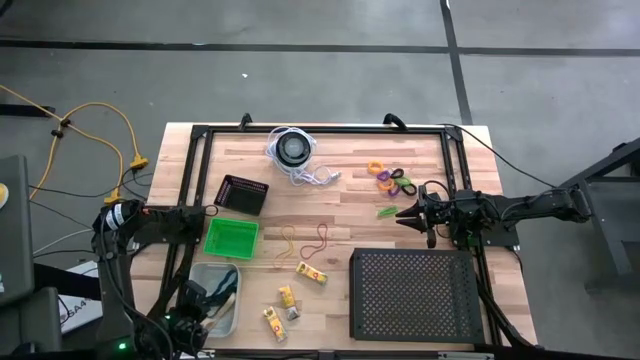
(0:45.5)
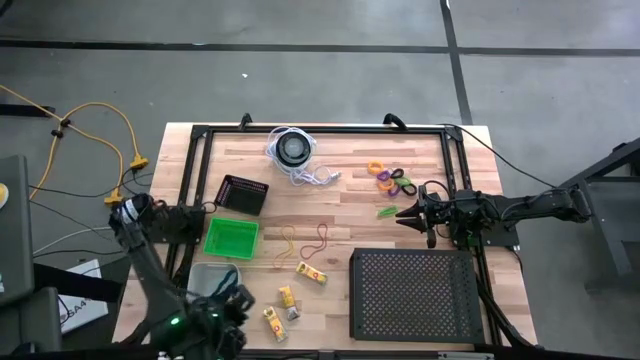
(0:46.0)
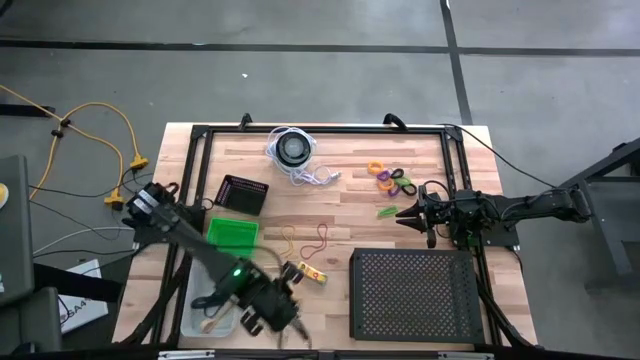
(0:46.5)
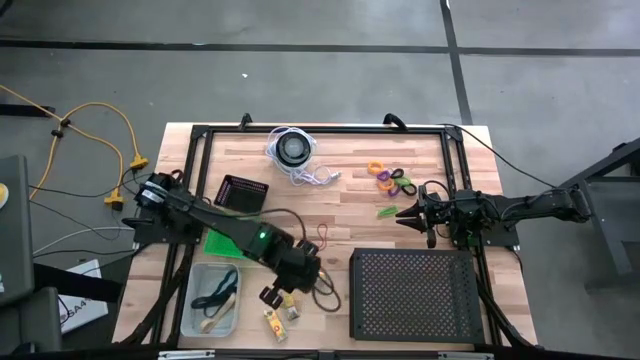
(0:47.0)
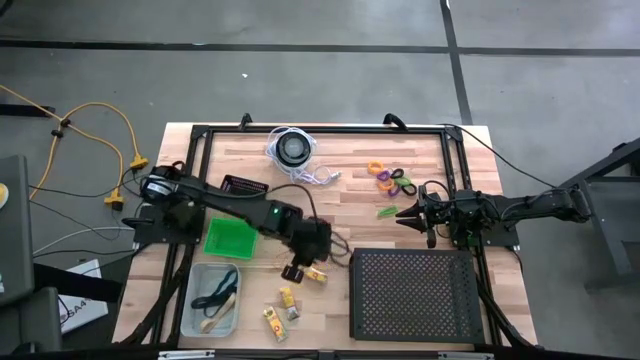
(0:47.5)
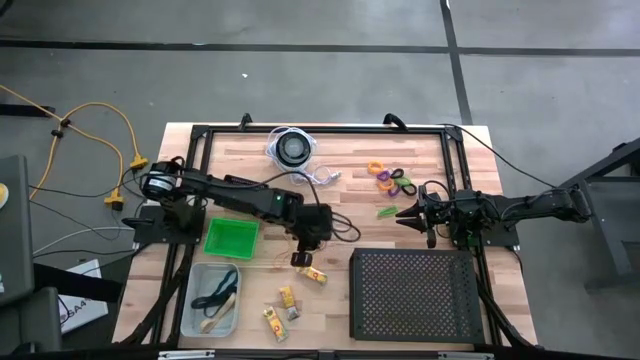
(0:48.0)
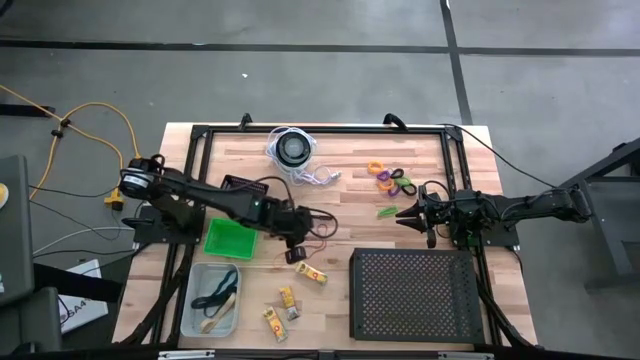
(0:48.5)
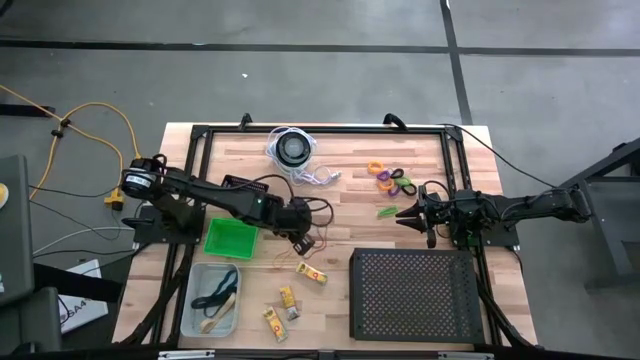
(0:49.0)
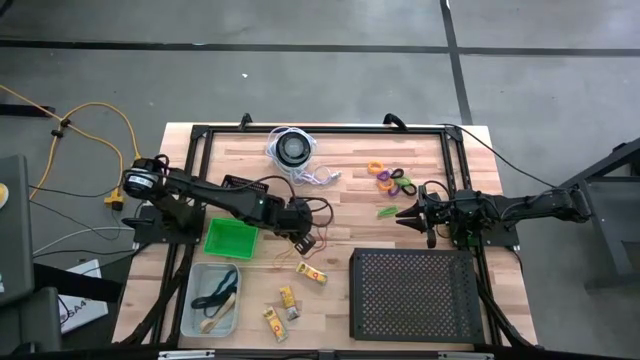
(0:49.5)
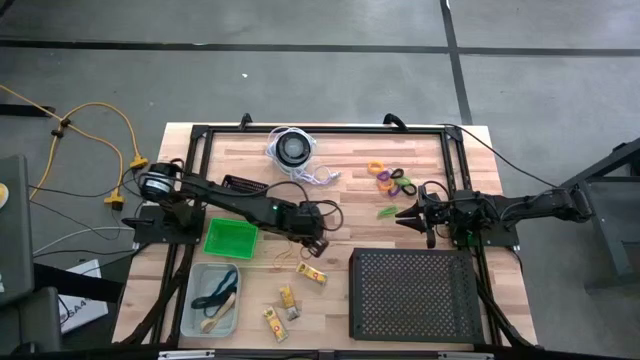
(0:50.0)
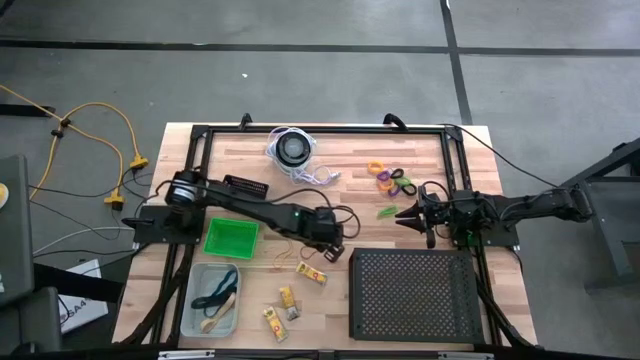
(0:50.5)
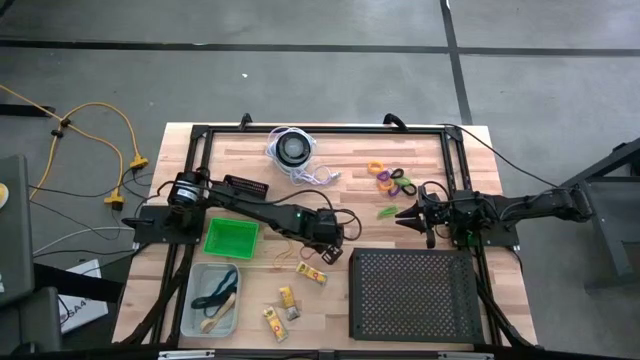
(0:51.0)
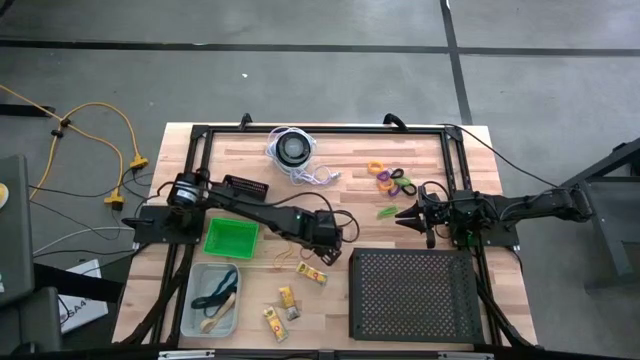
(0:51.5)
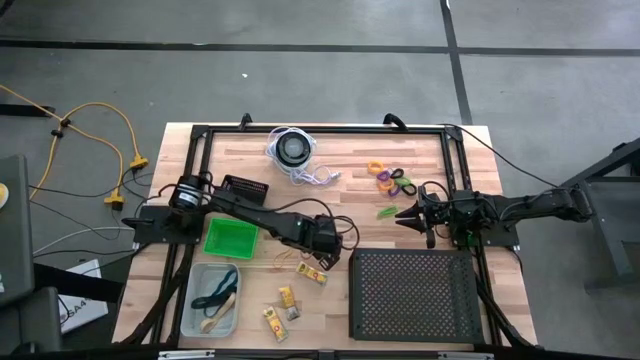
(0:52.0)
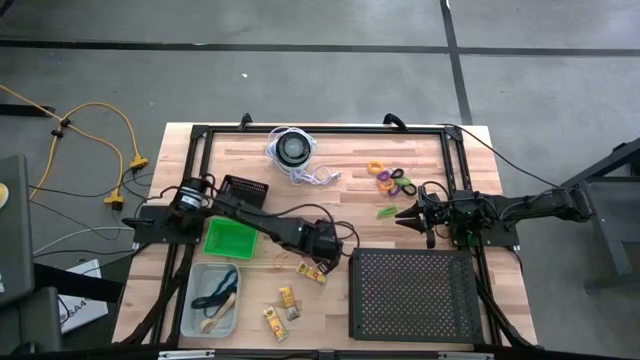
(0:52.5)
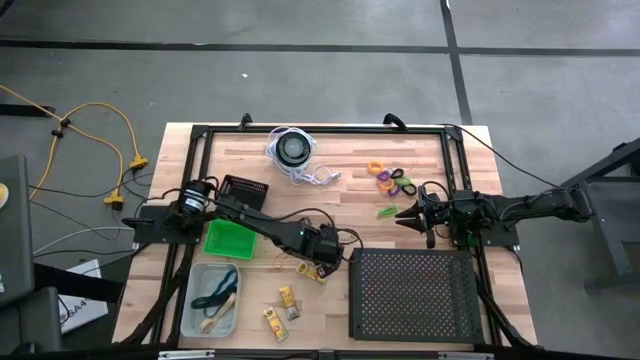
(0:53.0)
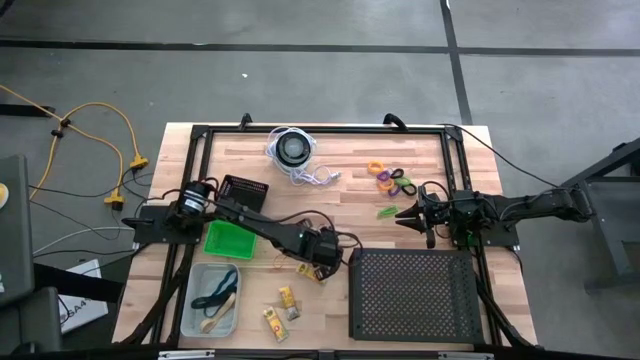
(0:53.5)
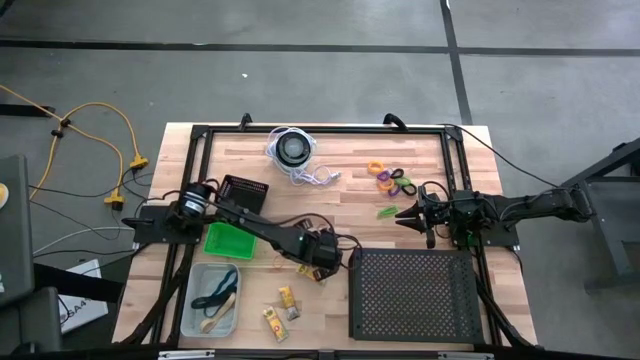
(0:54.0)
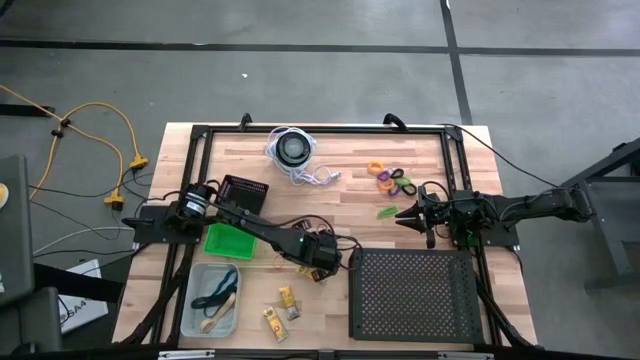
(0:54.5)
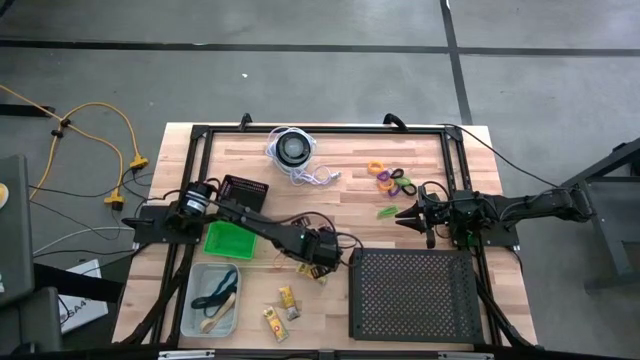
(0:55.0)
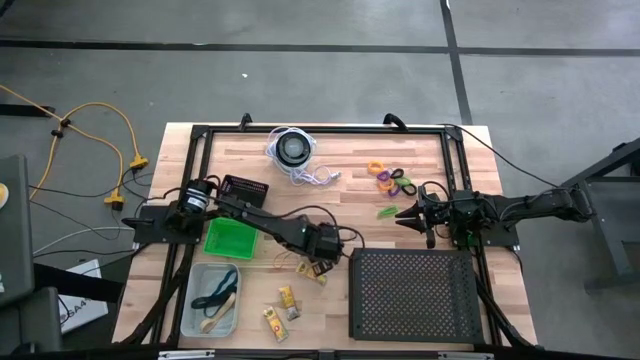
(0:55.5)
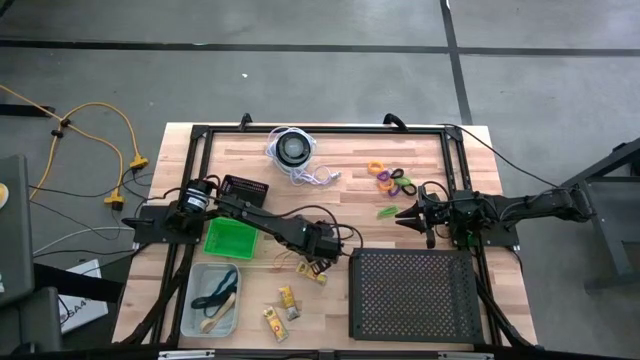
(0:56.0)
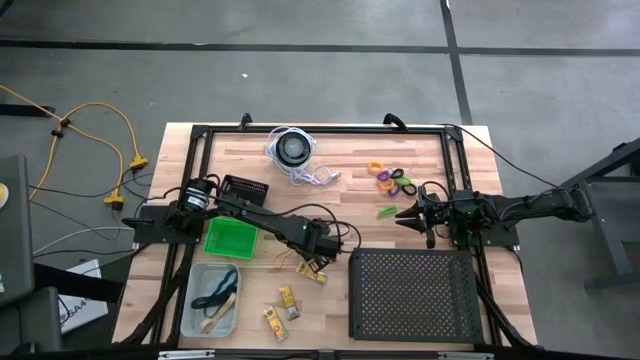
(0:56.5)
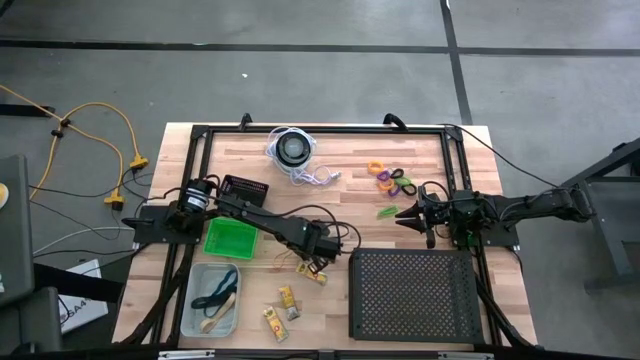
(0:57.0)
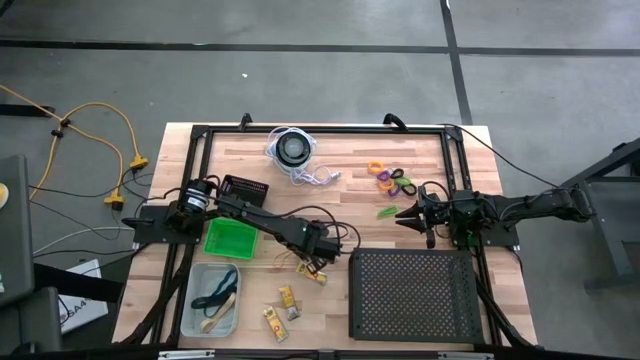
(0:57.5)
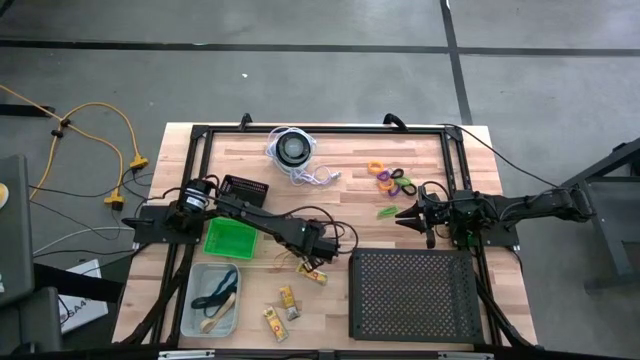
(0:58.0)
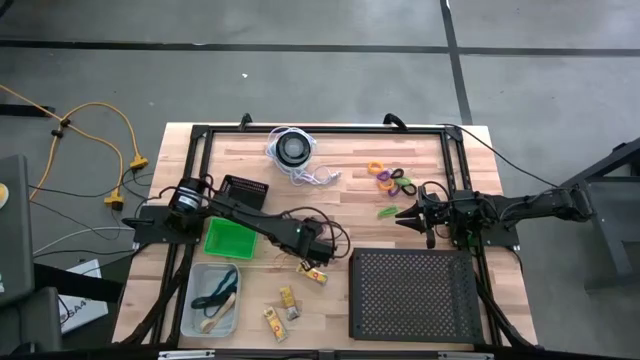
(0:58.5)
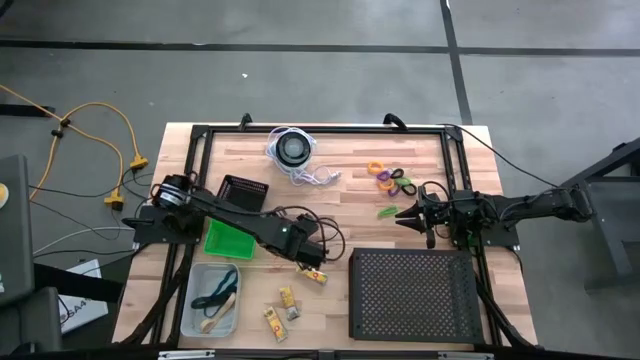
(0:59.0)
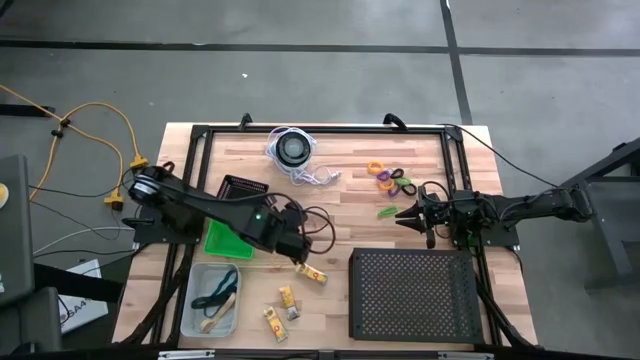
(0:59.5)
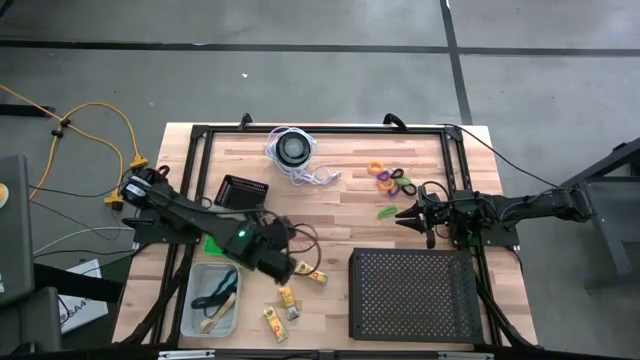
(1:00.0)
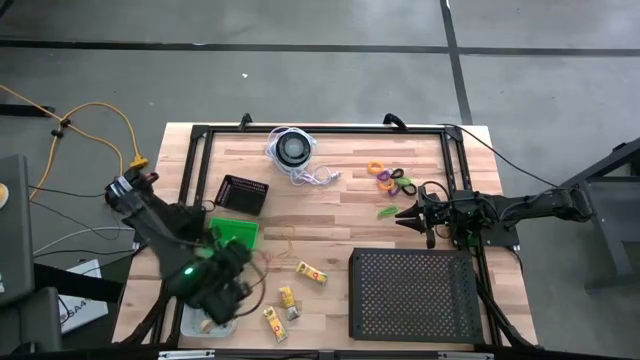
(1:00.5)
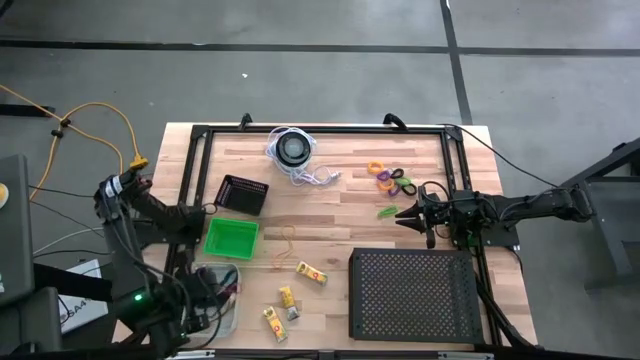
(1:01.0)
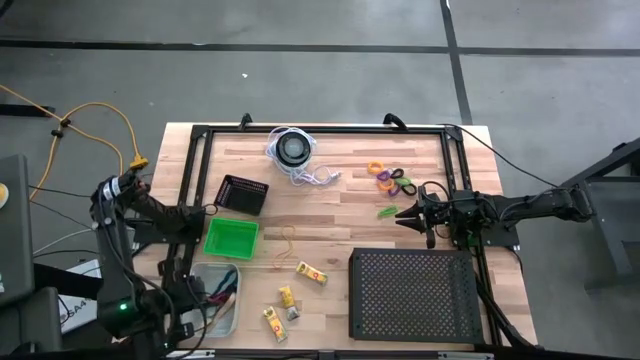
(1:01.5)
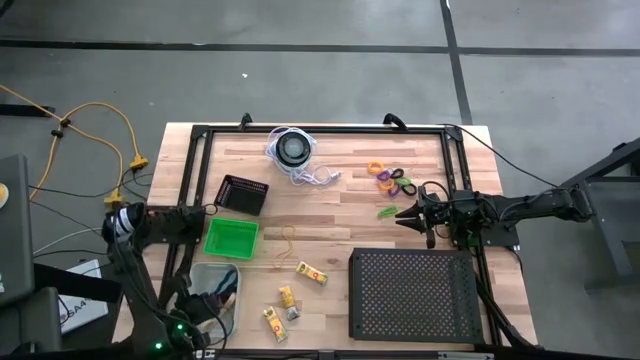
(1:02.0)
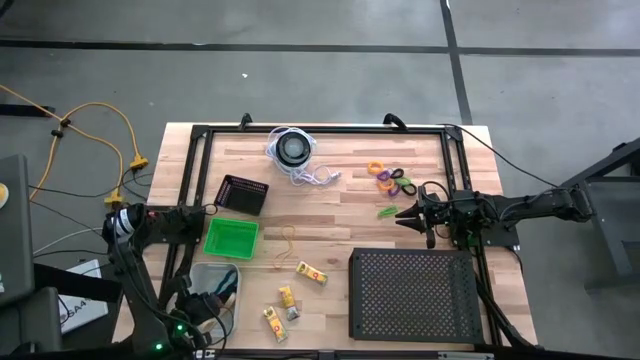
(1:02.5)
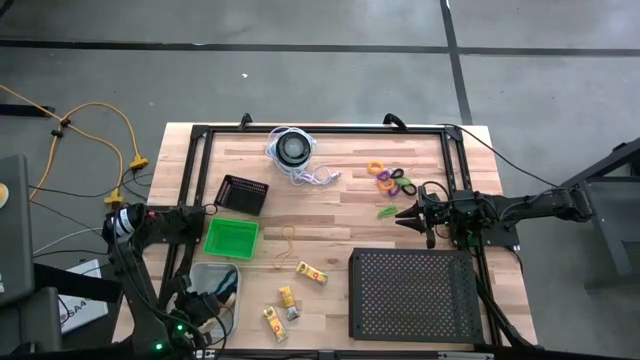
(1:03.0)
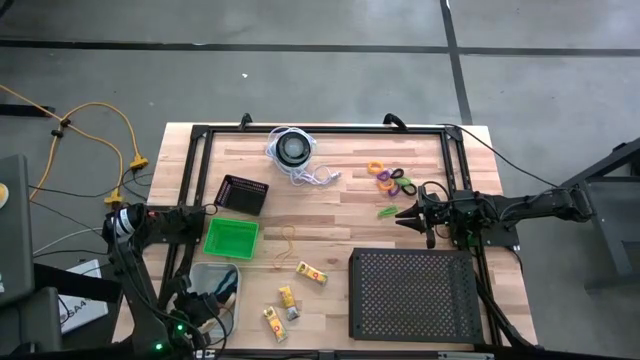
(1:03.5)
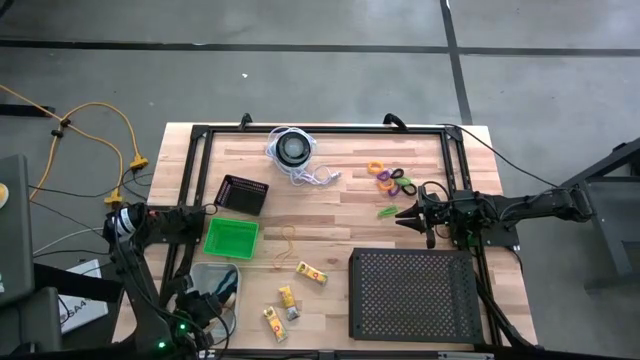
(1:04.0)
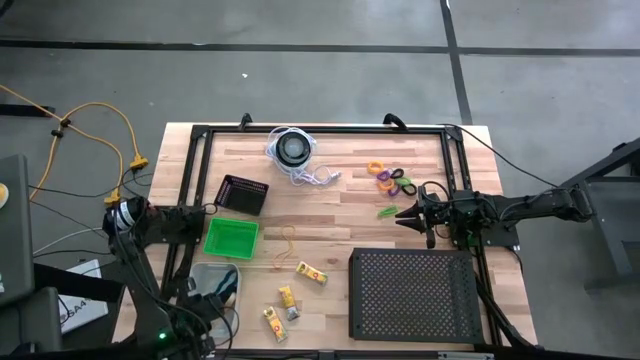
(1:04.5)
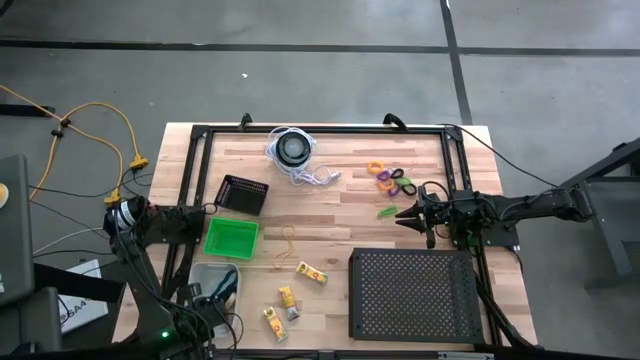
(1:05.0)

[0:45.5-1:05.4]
Task: Pick & Place Office Desk Supplies
Put the red rubber band into the gray bin

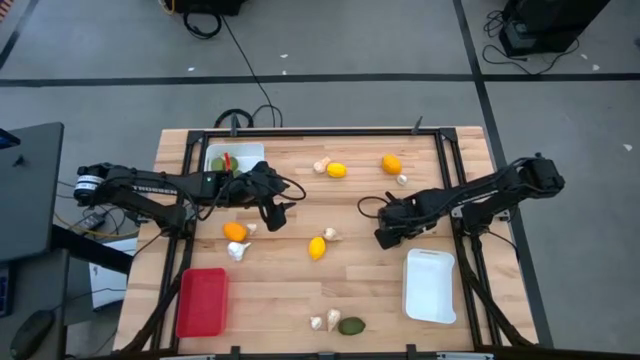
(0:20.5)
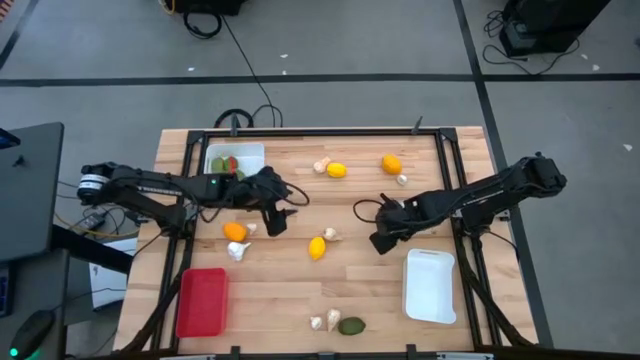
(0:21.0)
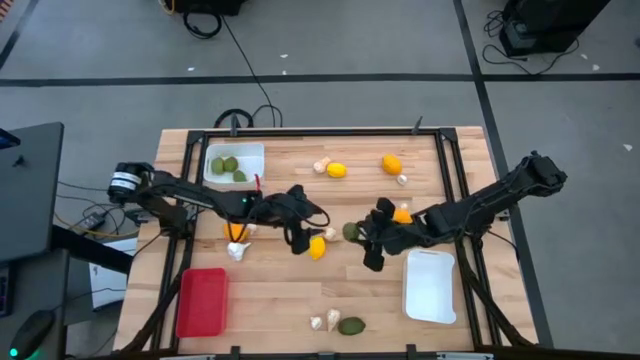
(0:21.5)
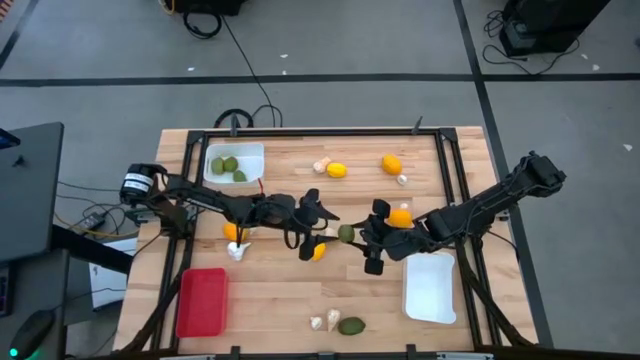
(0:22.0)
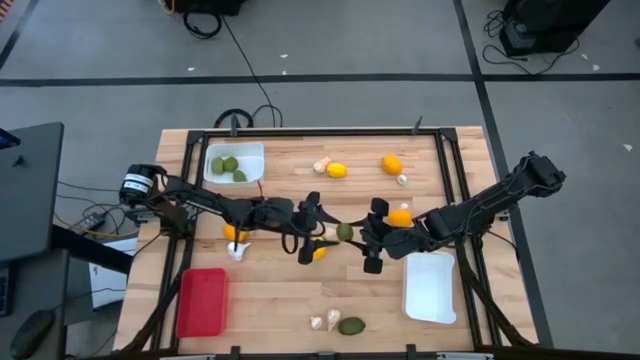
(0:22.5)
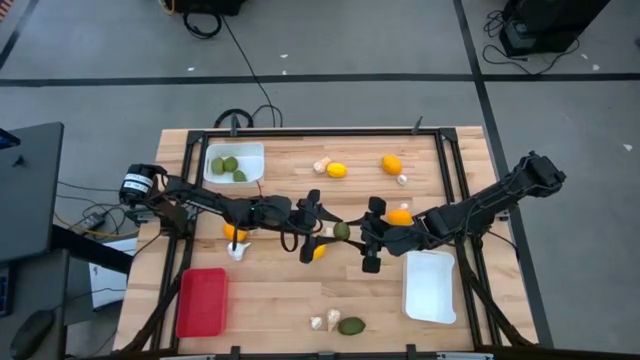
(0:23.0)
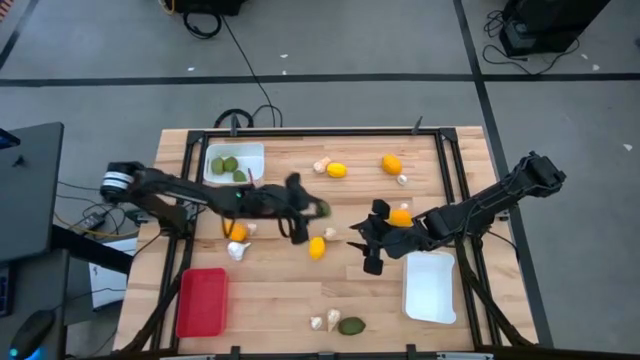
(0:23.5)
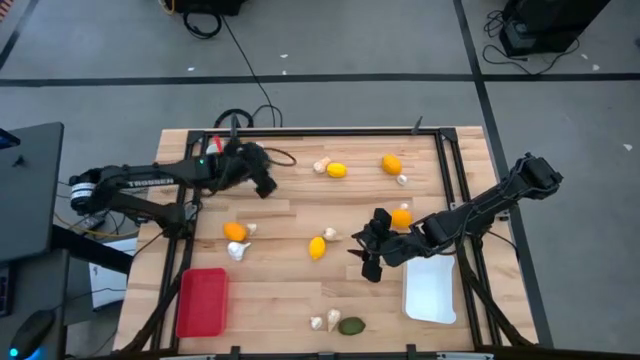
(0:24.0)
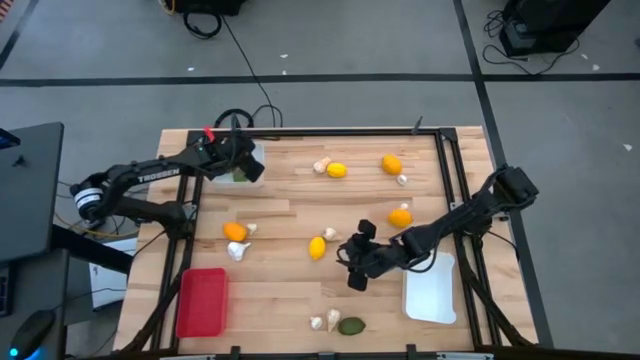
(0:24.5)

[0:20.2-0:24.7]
Task: Sort produce into baskets
Put the top green lime into the top white bin
